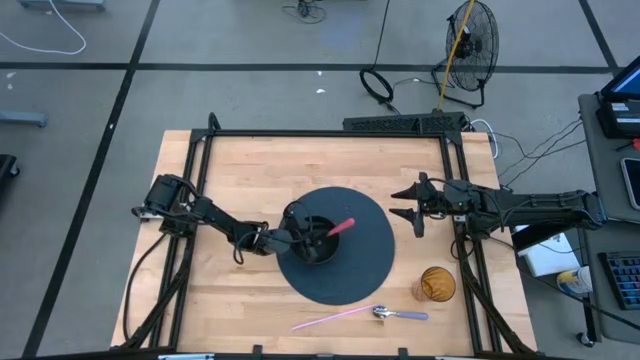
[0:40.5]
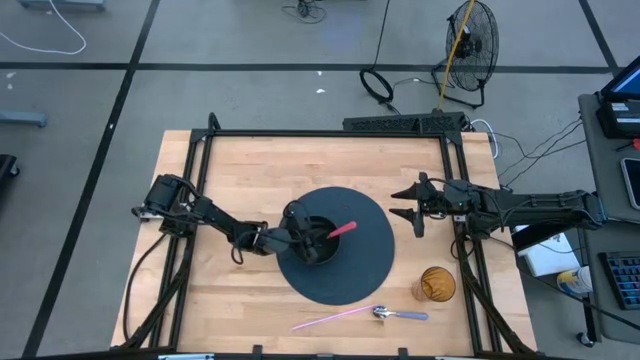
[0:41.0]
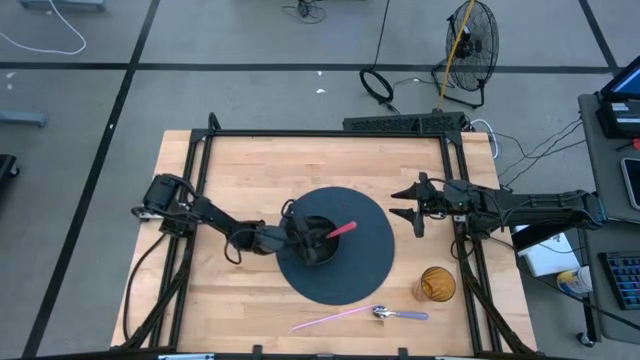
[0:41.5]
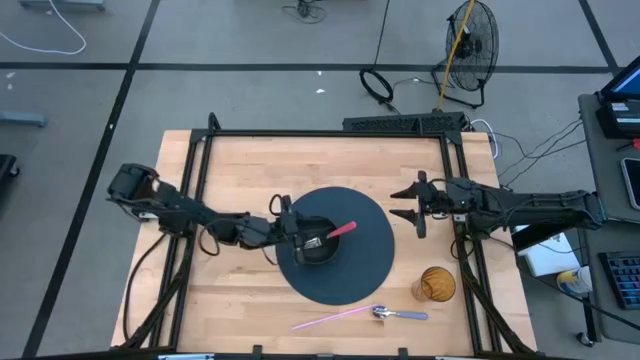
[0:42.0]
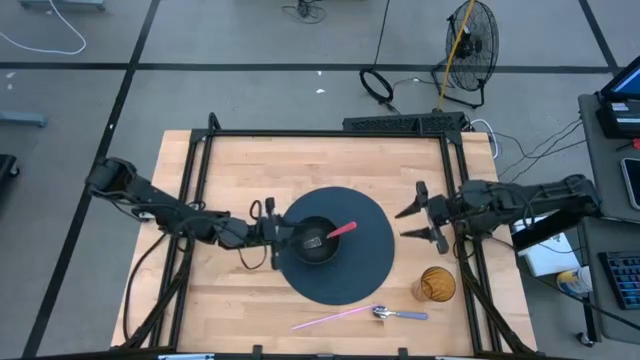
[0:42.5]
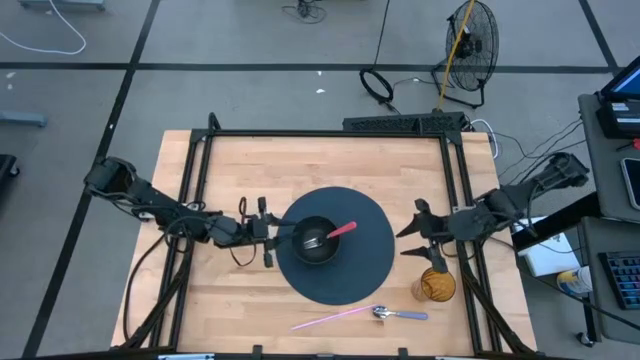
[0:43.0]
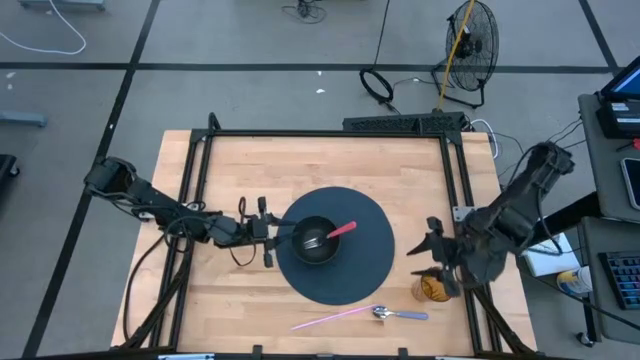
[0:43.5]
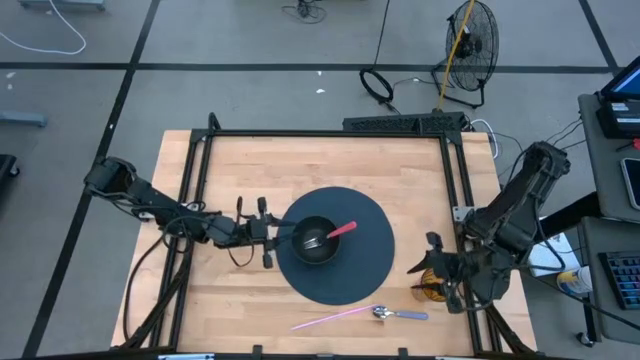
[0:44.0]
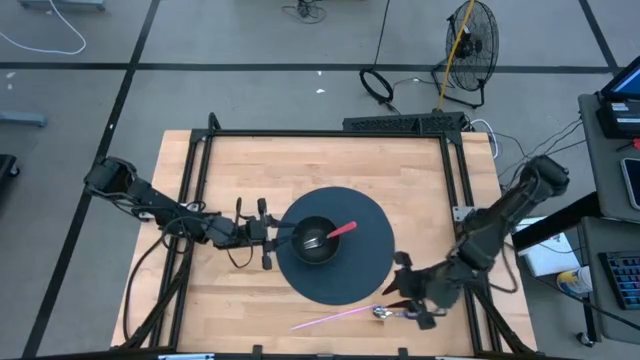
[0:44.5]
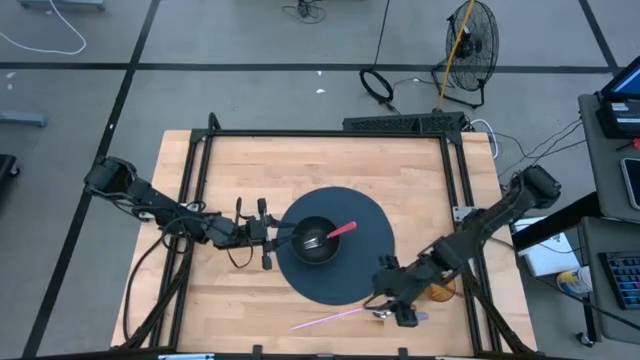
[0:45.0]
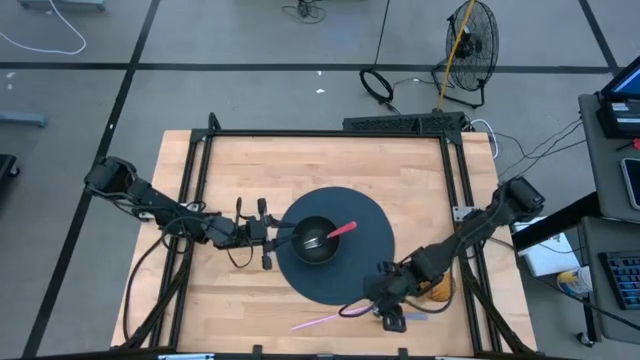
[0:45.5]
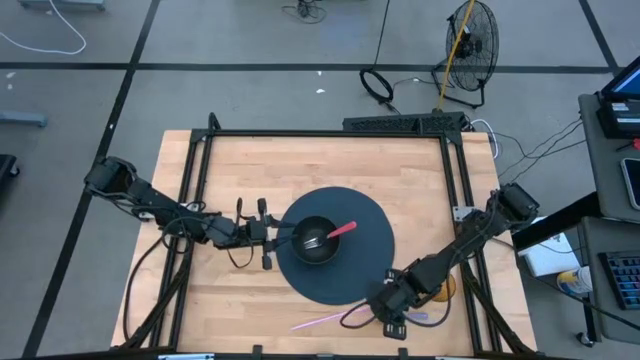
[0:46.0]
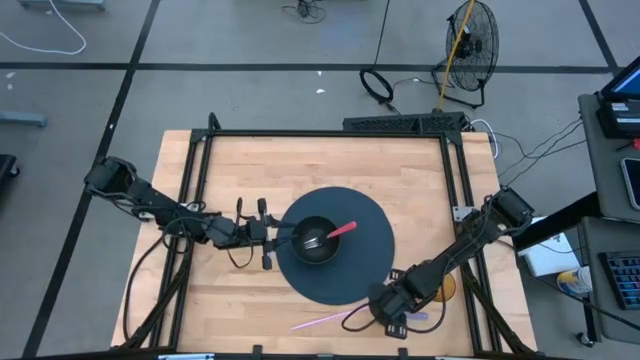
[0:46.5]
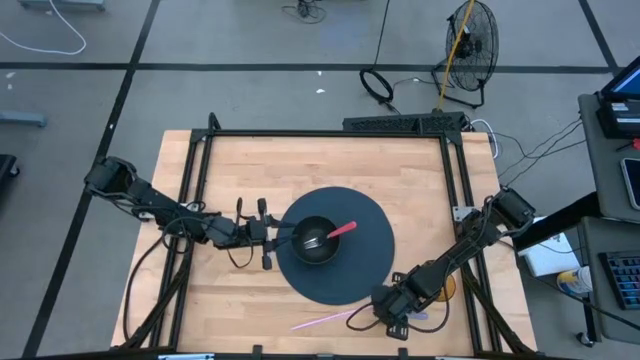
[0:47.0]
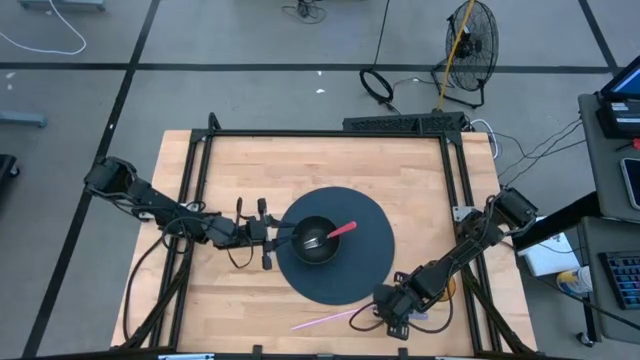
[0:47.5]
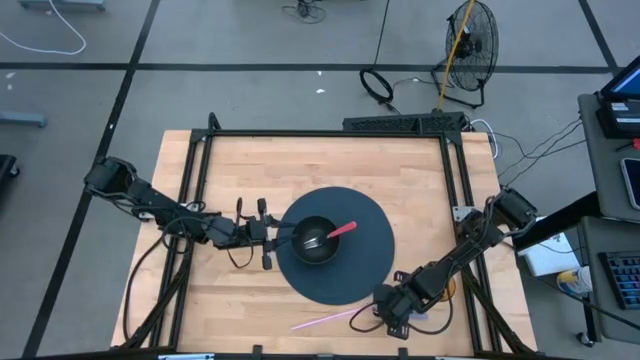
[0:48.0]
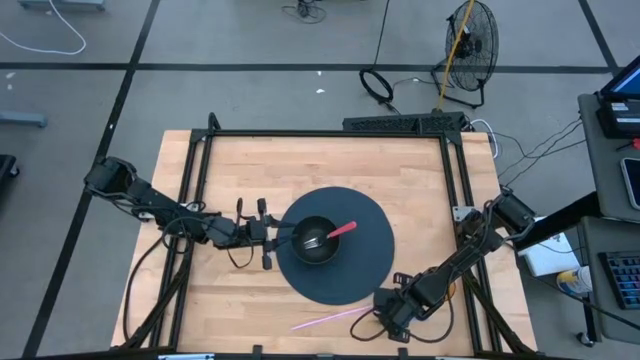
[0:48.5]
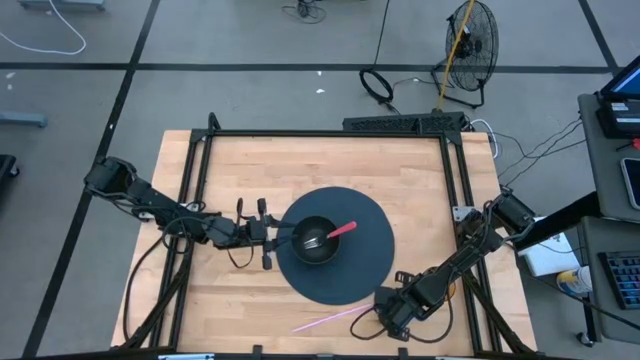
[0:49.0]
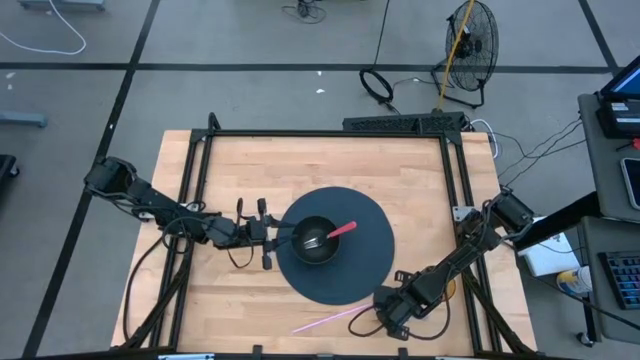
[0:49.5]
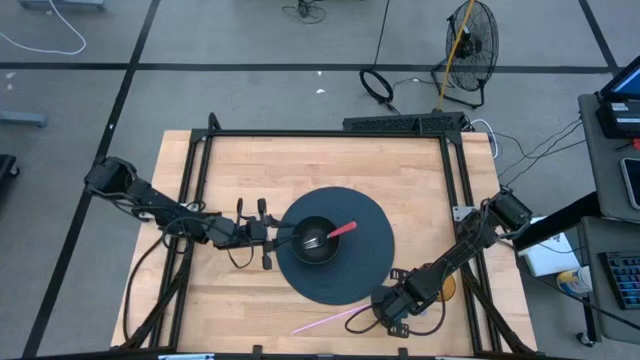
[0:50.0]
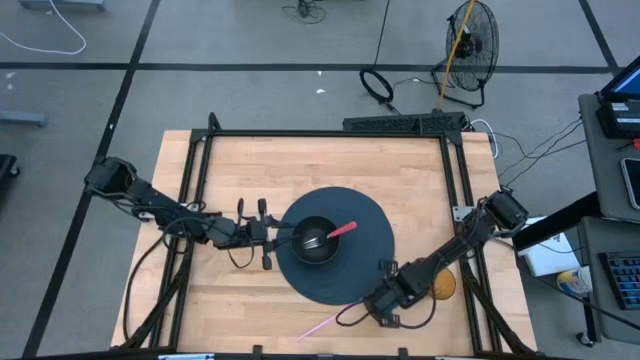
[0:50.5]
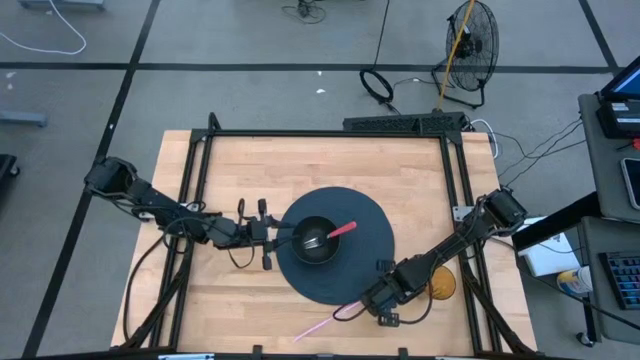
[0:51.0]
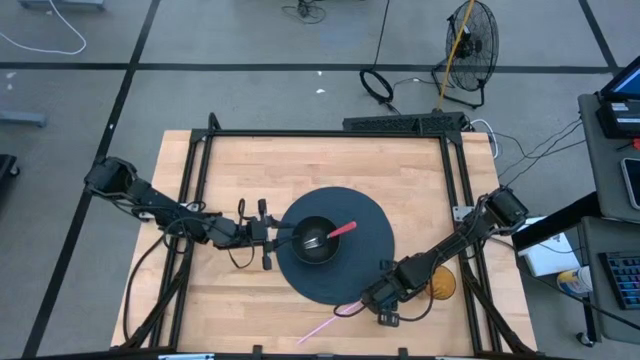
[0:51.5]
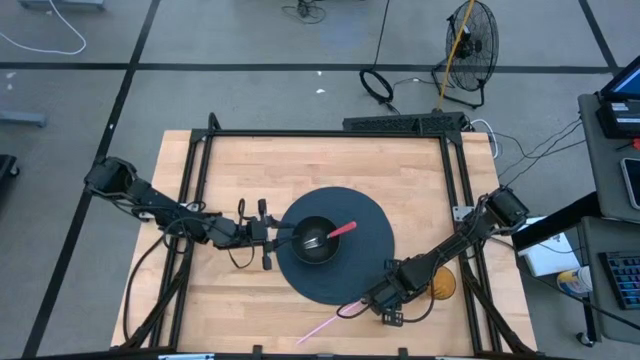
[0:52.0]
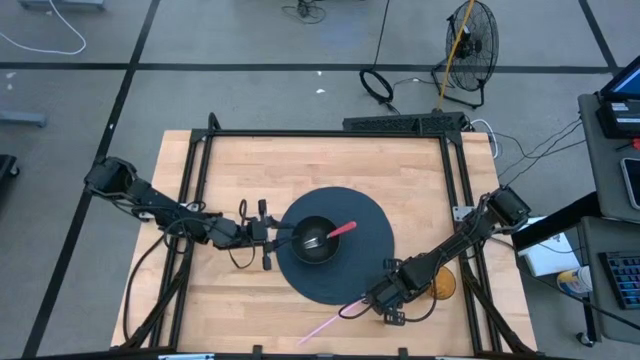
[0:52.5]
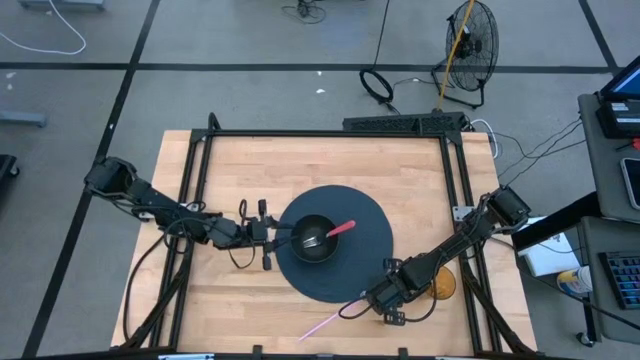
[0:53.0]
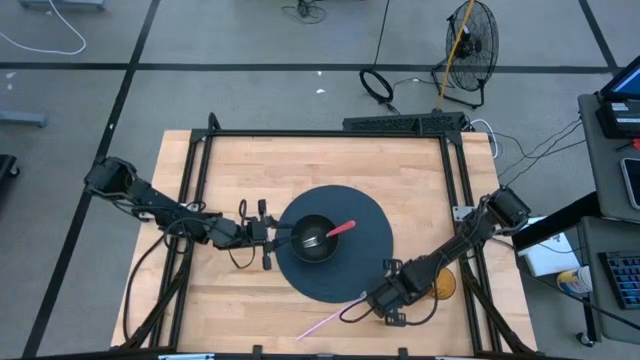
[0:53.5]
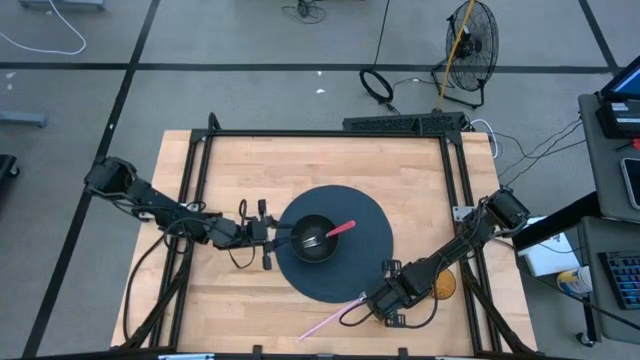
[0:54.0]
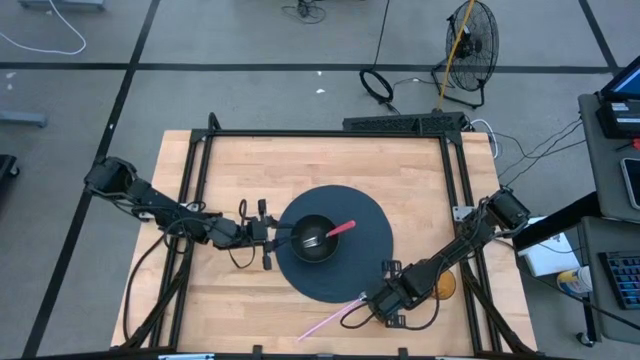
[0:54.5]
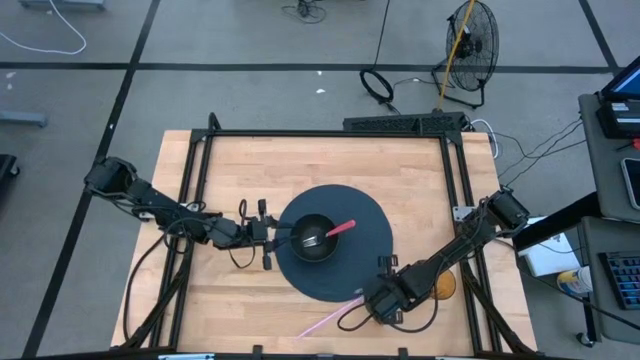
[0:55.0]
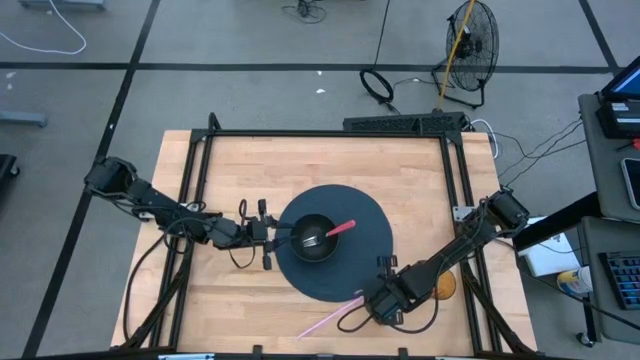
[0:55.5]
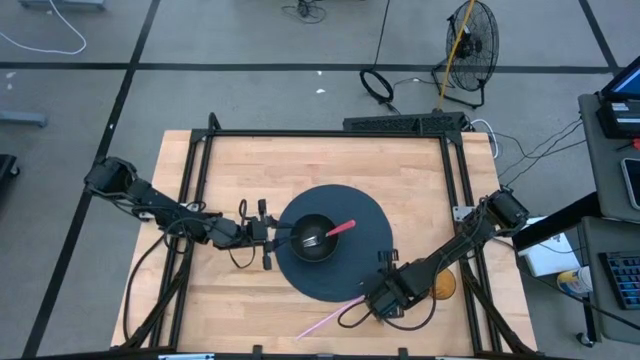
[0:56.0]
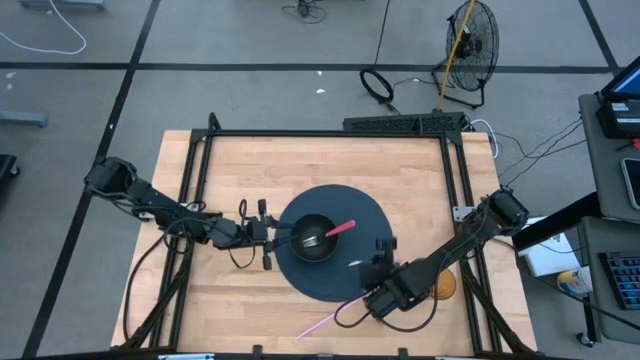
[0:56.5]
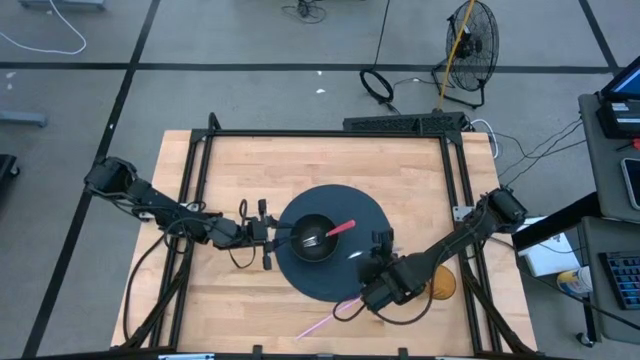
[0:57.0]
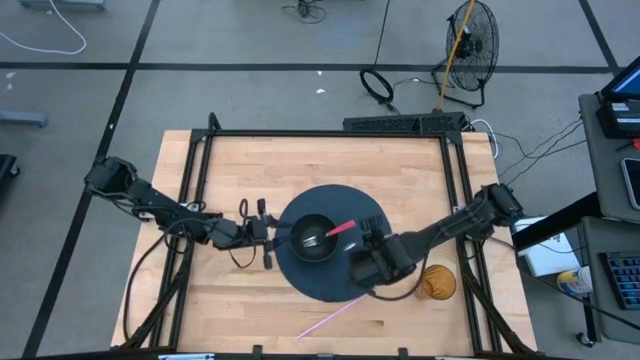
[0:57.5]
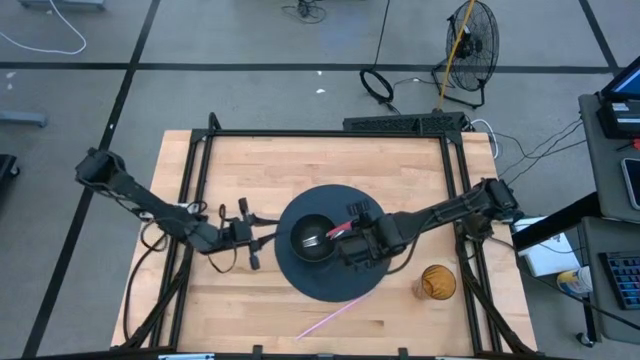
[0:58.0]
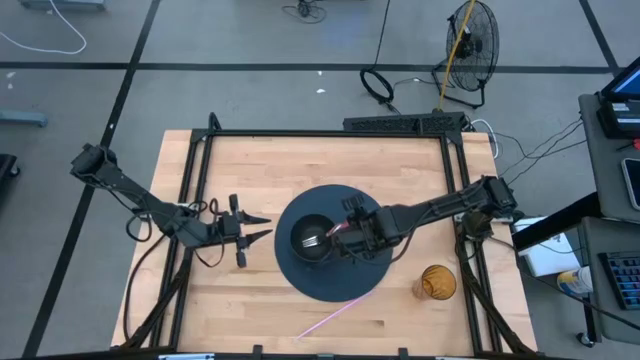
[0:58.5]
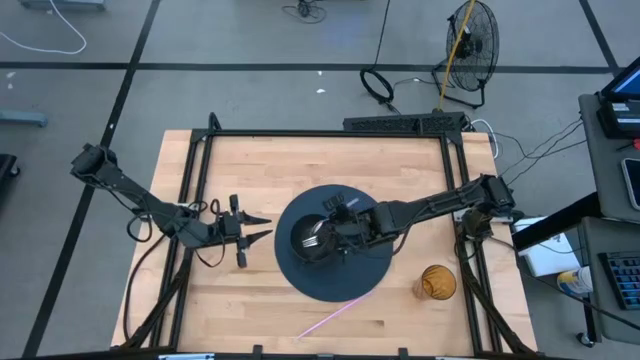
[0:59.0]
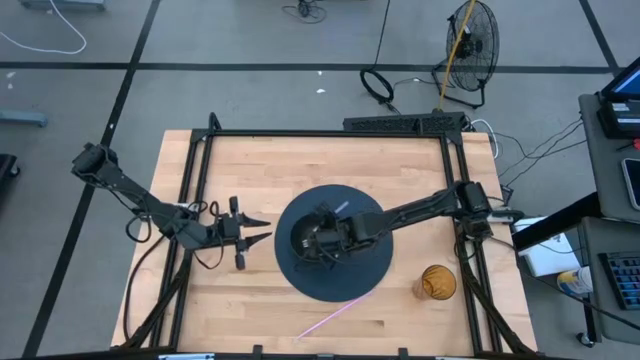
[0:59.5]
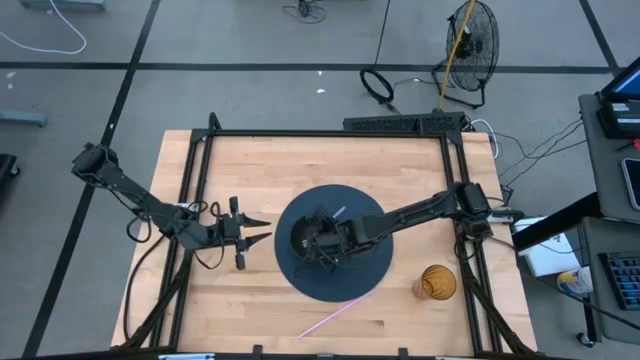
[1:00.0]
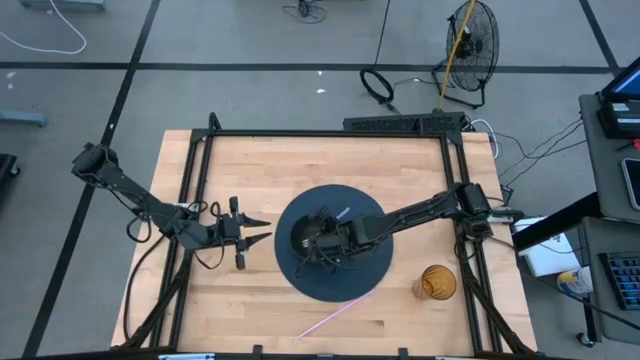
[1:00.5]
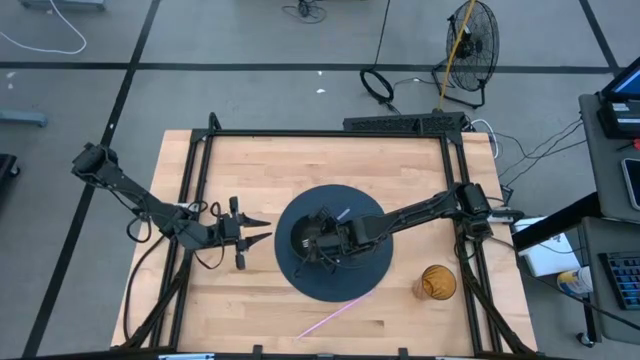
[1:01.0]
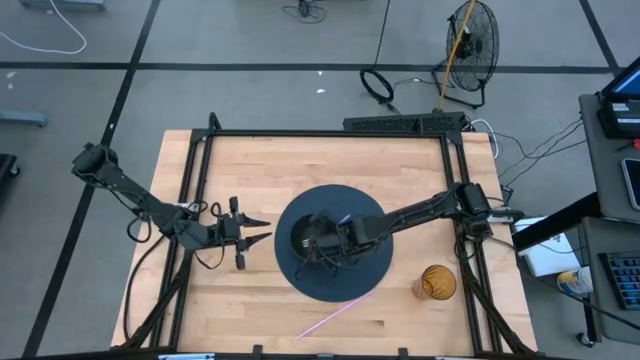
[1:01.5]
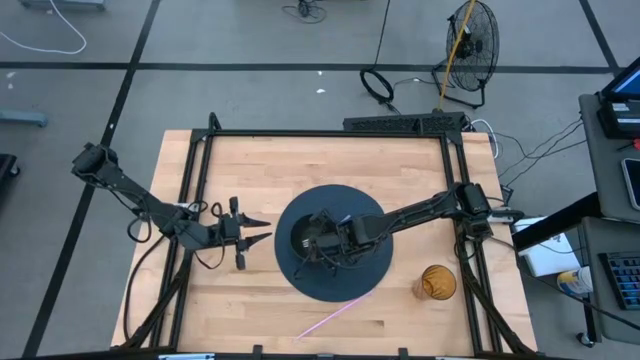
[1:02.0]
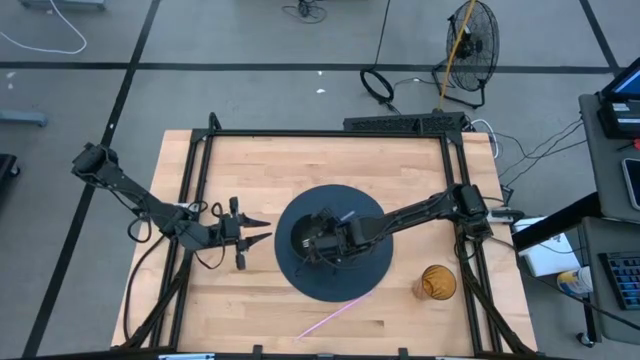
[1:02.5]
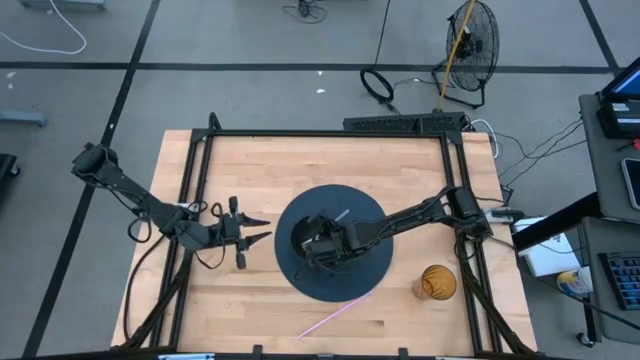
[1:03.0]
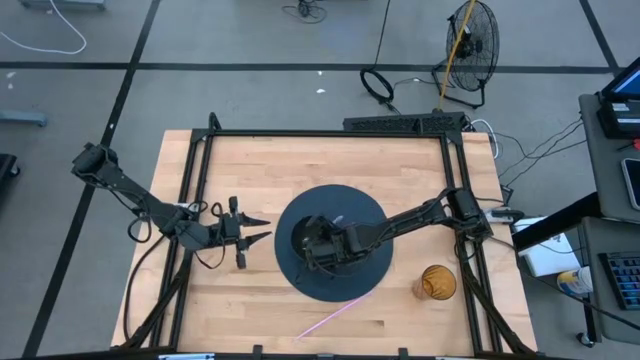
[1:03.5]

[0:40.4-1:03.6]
Task: Pick & Place Utensil
Put the blue spoon into the black bowl
